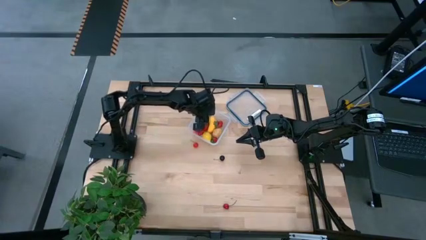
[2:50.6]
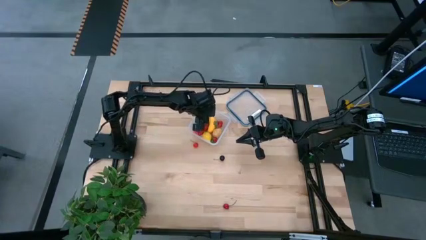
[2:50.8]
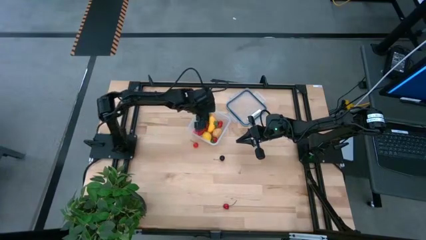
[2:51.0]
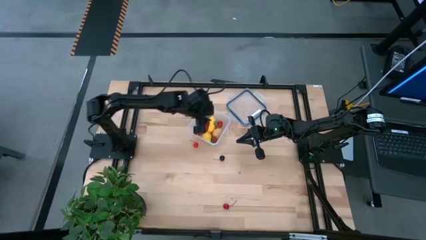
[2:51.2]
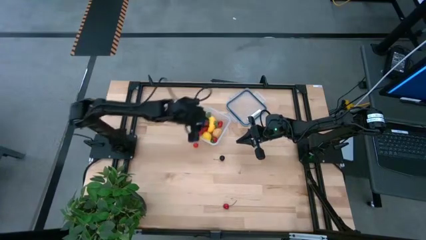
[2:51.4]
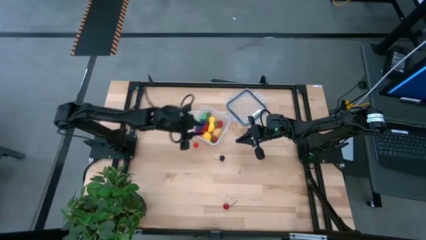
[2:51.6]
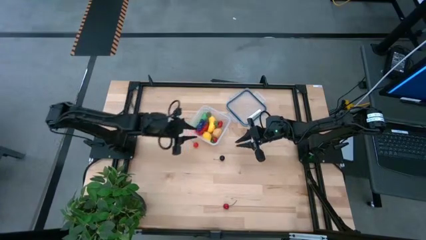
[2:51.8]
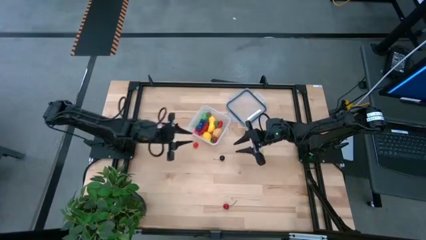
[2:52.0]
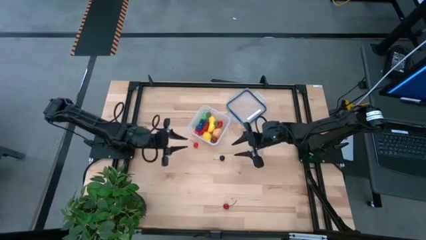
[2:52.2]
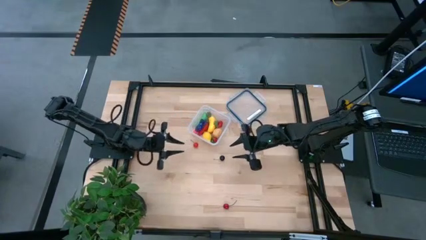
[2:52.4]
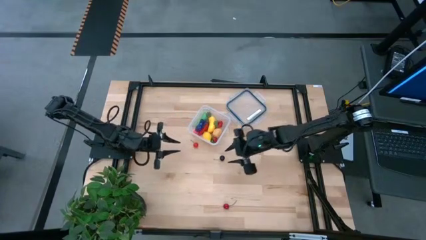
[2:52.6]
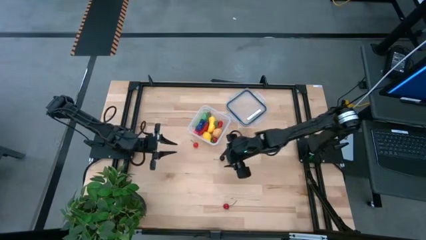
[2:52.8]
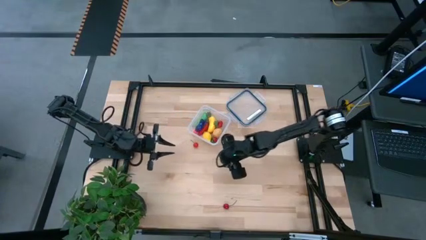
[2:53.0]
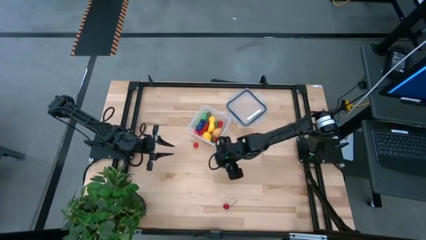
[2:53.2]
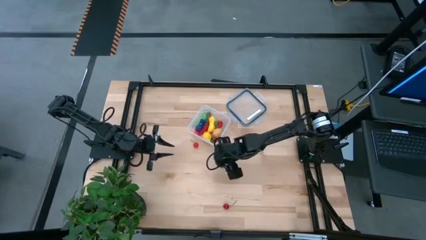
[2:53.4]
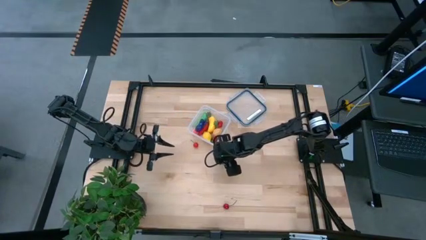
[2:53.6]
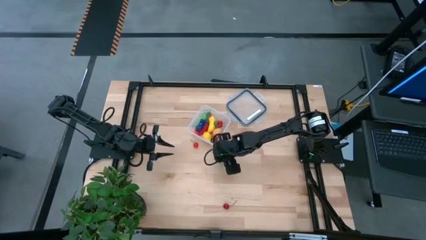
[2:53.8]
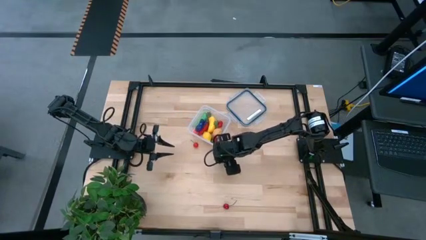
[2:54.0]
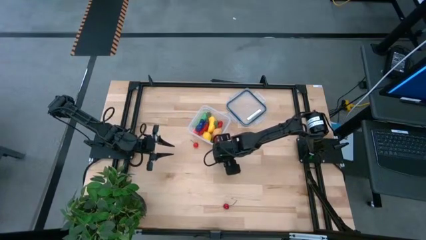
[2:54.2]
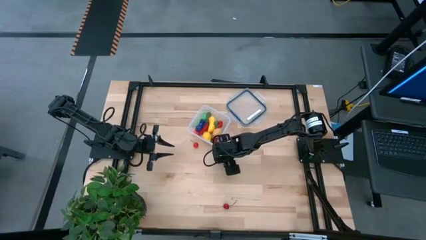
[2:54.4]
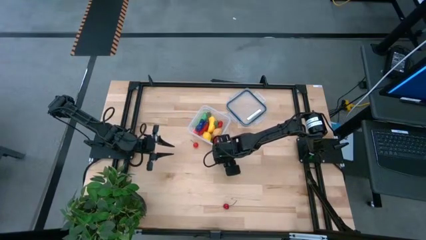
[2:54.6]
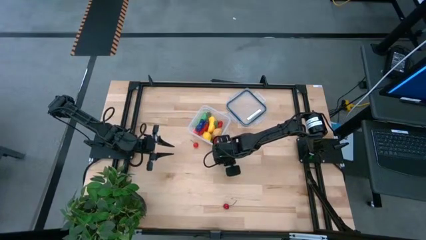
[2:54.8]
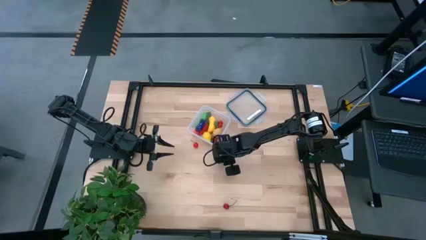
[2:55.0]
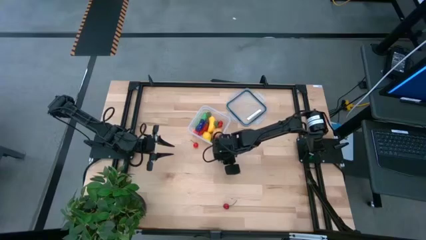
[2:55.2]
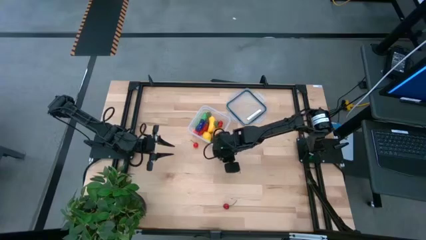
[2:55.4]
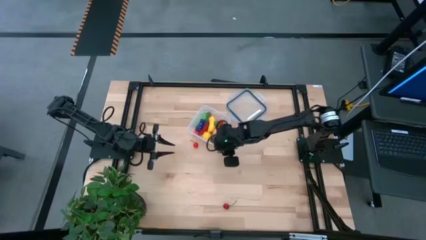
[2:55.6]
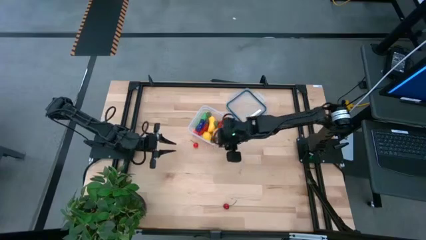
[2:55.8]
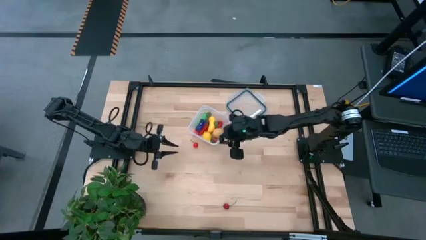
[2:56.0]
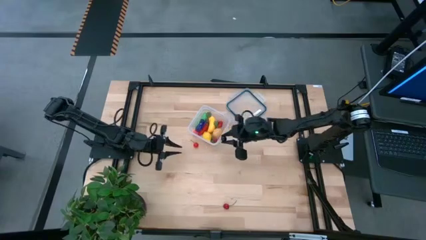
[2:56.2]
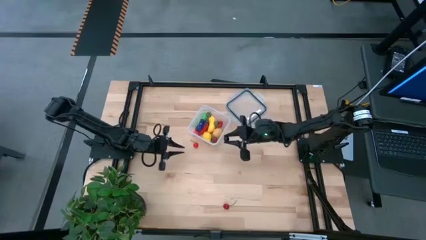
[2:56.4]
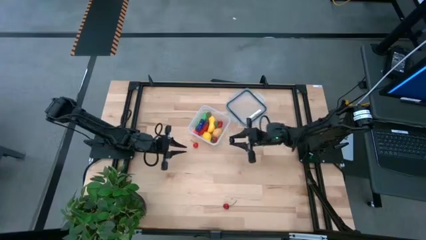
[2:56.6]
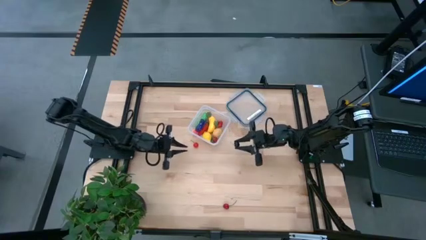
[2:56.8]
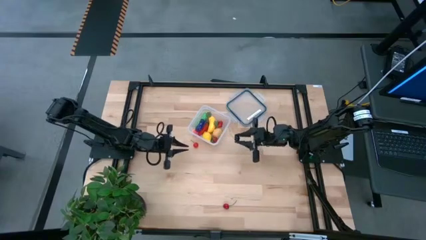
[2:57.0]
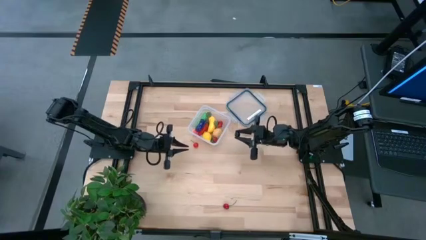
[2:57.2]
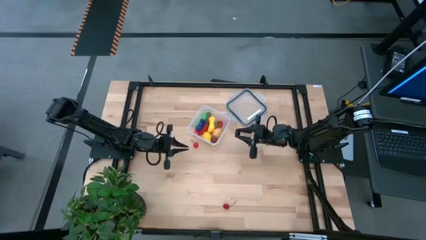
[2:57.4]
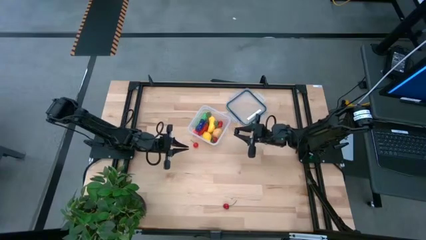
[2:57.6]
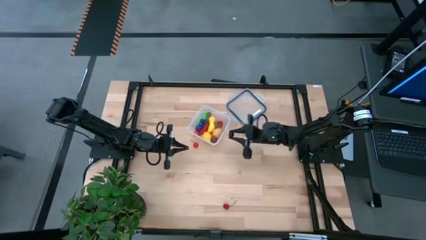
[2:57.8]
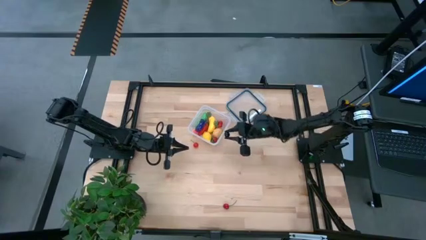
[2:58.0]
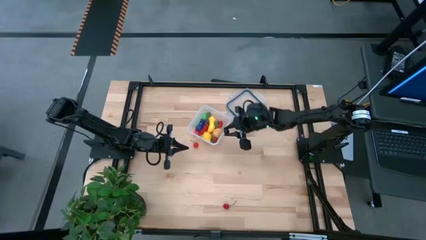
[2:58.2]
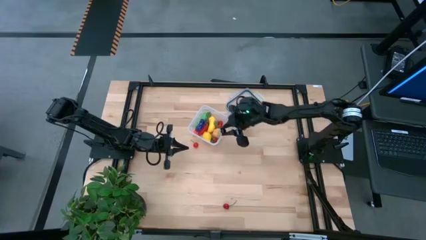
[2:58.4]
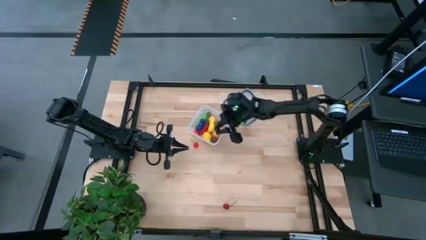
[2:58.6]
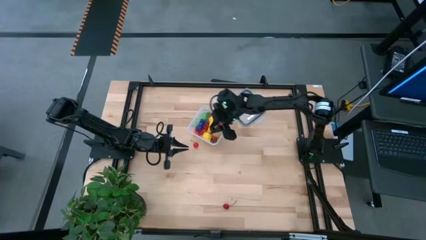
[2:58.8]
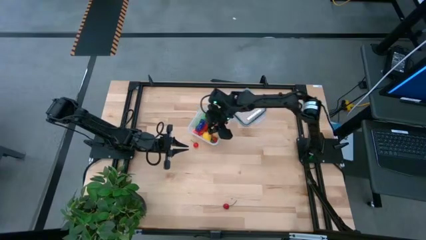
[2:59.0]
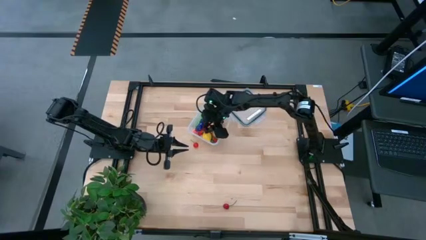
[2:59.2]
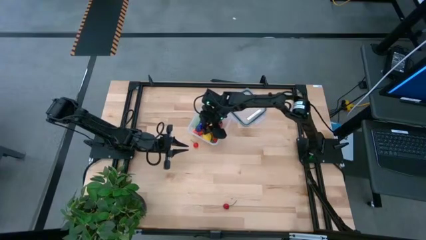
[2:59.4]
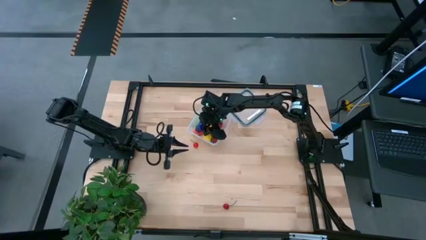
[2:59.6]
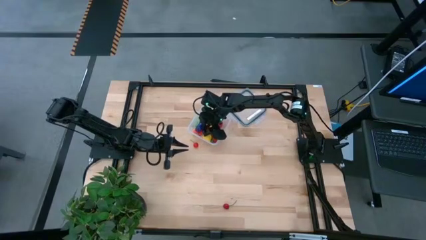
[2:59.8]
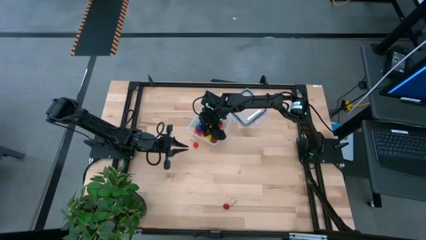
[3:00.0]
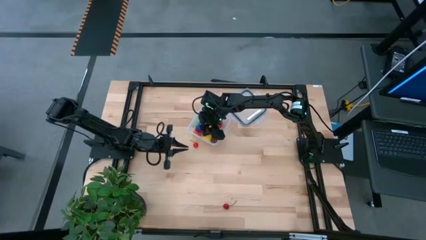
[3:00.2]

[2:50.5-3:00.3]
Task: Pick and placing Produce into tupperware
Put the black cherry into the transparent container

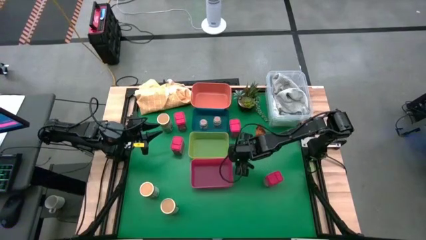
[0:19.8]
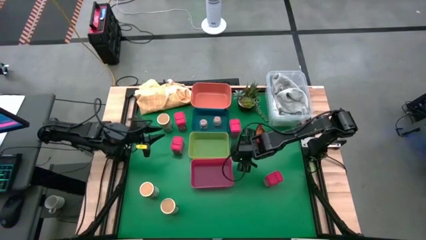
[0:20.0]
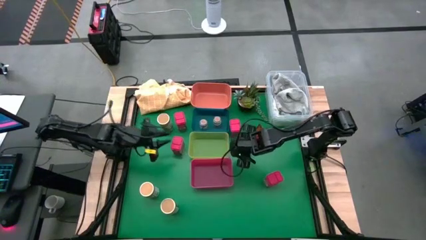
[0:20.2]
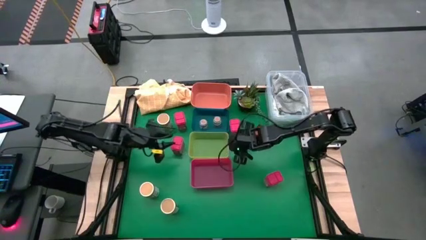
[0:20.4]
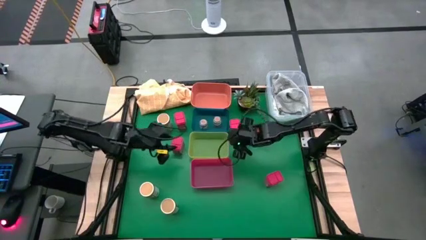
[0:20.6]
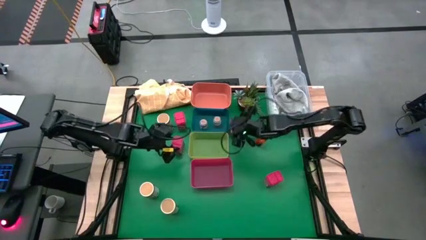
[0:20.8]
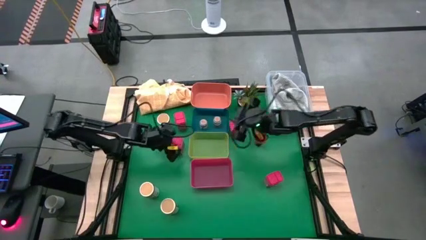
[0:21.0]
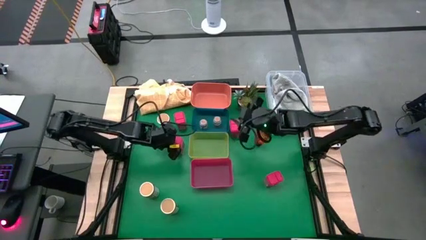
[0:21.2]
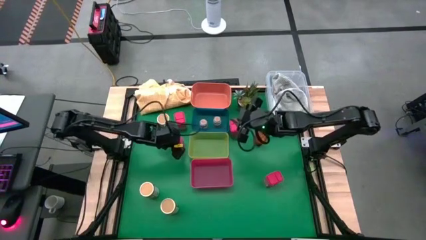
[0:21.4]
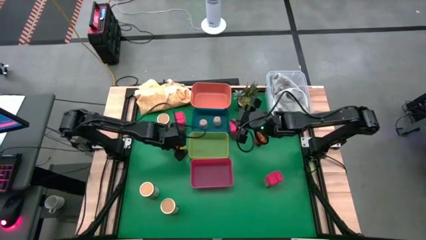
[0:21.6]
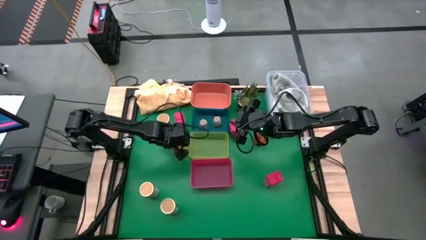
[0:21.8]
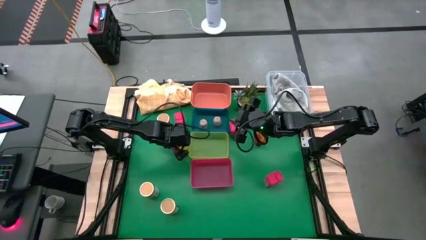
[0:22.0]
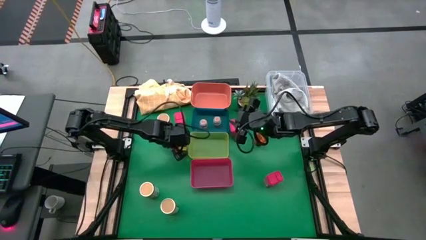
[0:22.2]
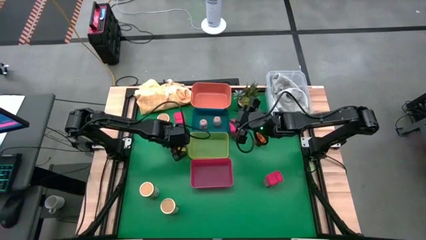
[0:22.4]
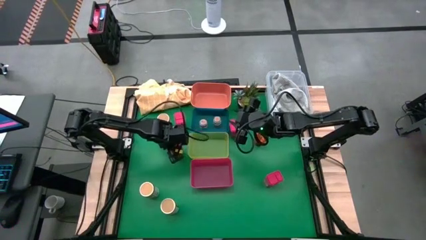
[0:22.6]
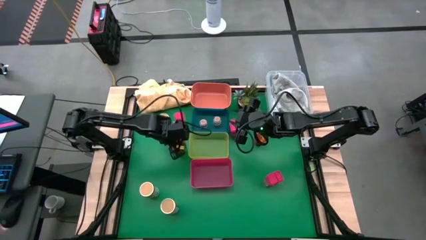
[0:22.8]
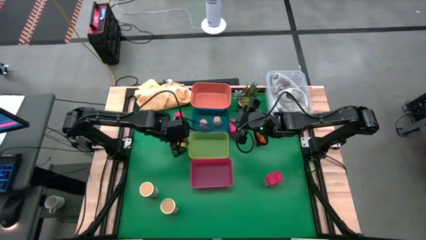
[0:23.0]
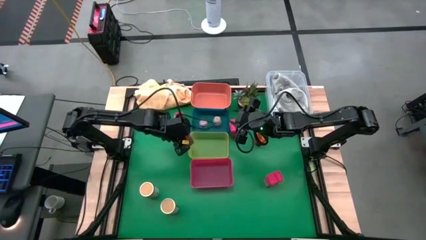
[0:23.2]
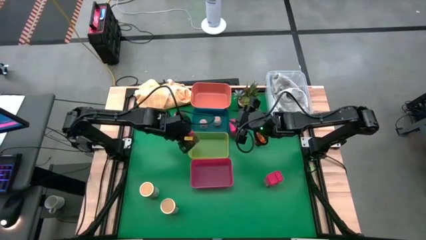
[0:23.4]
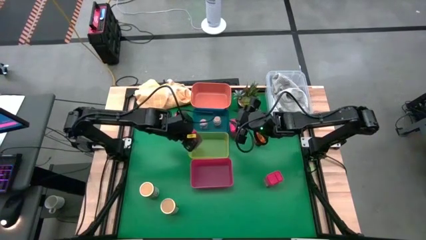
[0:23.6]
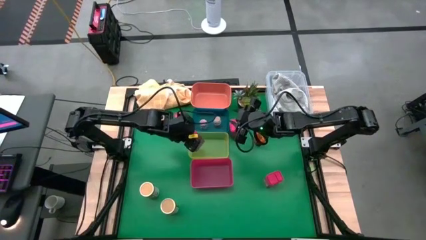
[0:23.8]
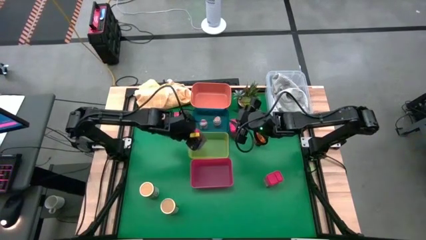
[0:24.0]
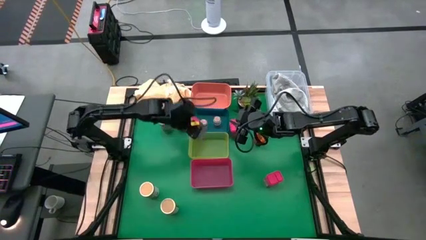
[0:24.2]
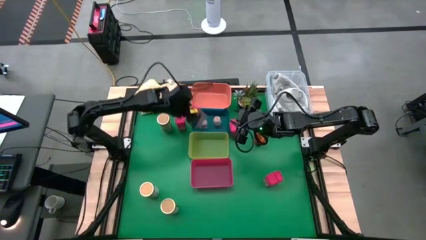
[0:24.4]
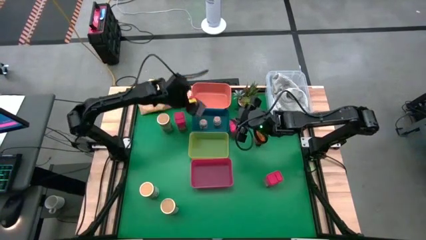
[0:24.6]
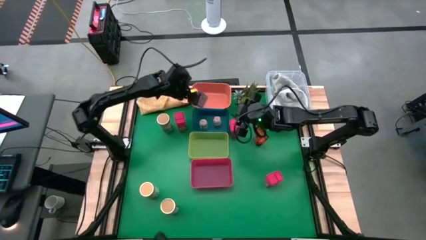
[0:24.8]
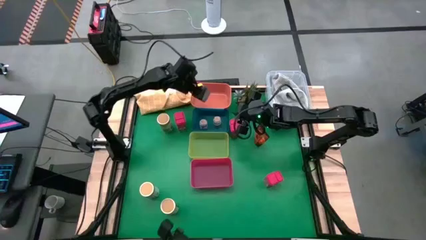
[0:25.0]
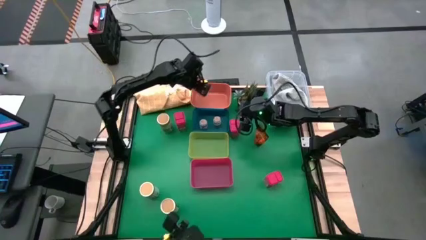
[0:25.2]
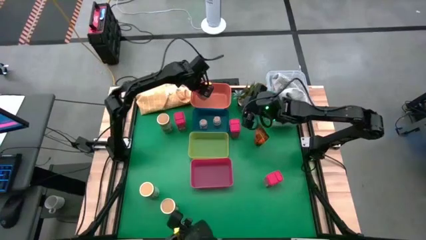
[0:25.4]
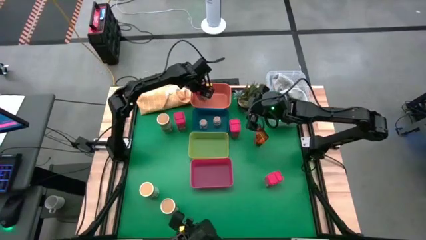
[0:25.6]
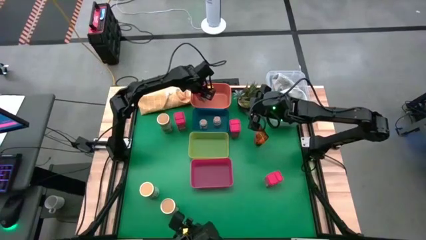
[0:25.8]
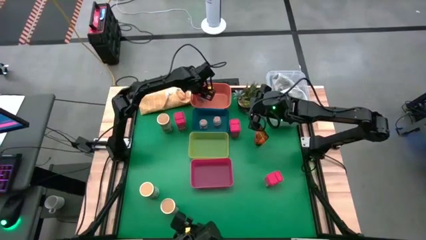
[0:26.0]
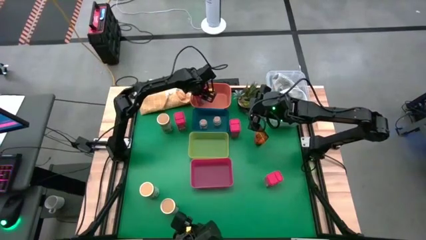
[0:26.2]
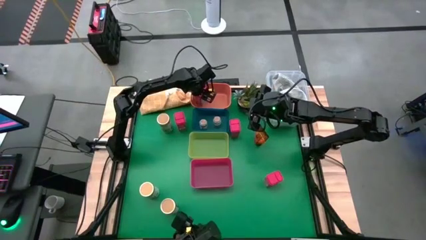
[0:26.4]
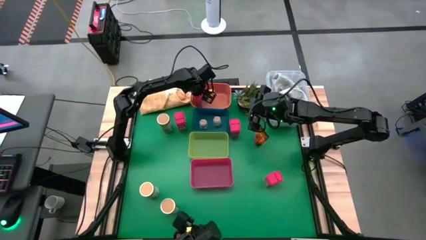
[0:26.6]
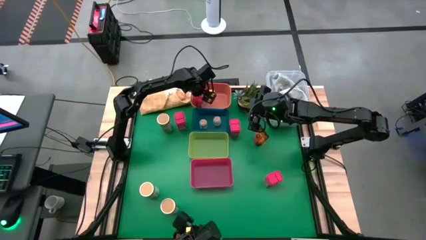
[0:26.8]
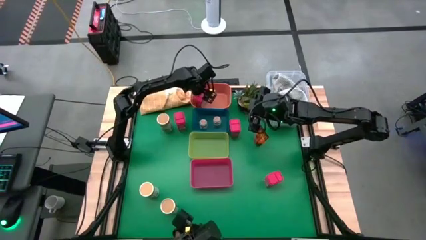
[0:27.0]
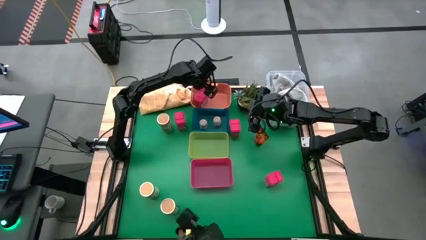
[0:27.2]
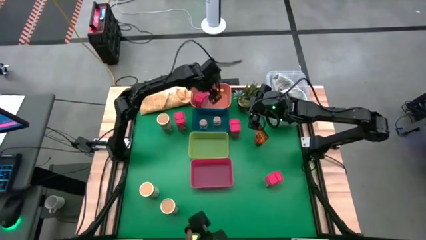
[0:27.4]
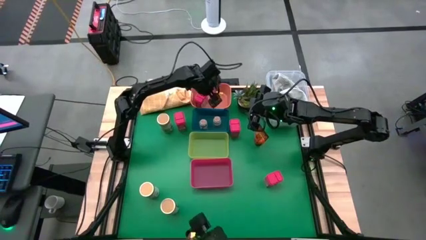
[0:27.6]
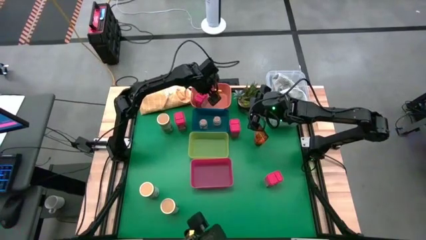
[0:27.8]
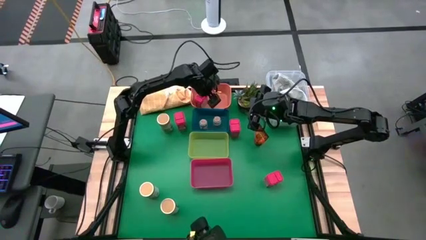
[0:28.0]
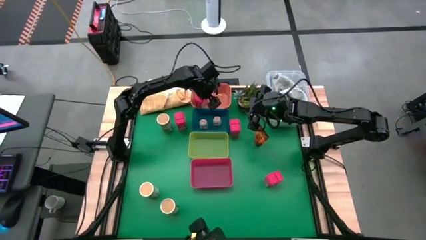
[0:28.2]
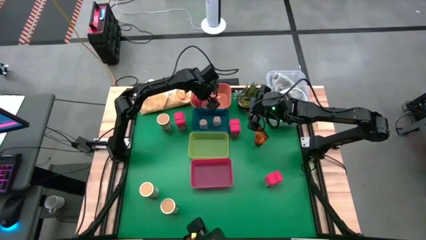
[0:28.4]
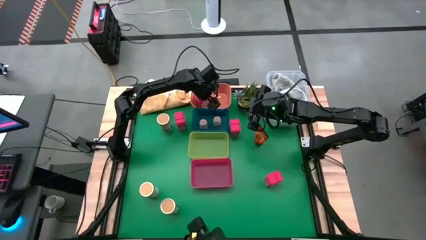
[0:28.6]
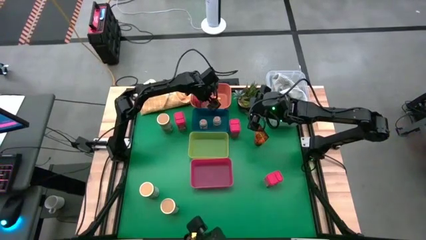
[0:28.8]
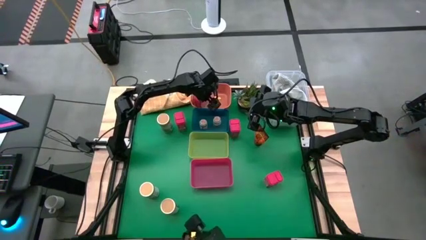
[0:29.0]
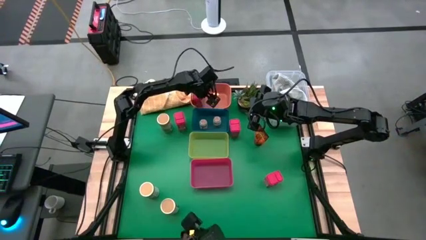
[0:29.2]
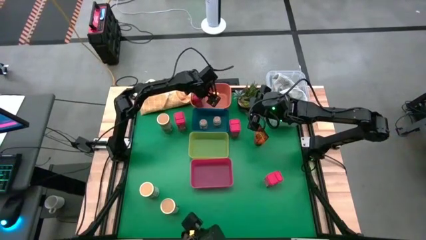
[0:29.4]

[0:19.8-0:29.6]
Task: Sort spices by type
Put the red seasoning can into the orange bin
